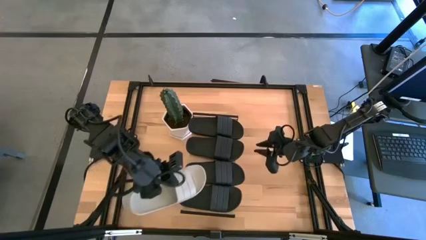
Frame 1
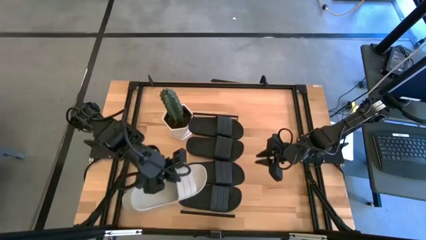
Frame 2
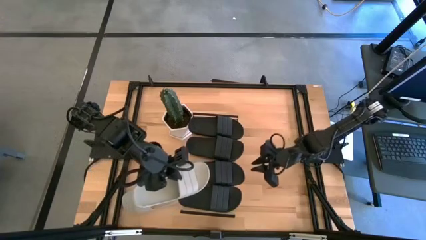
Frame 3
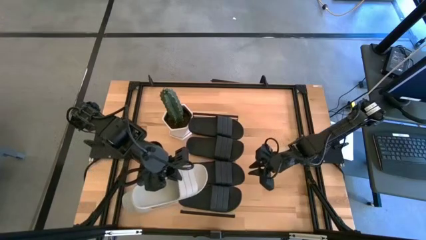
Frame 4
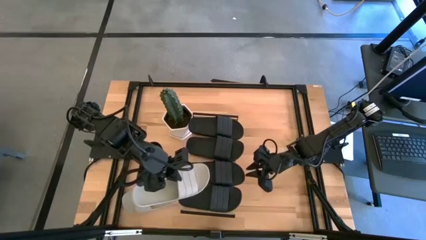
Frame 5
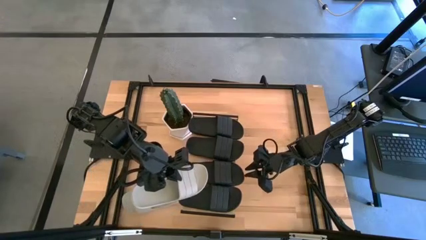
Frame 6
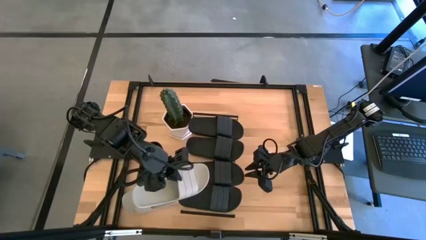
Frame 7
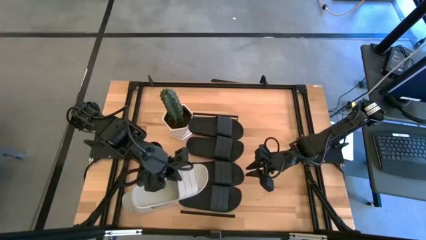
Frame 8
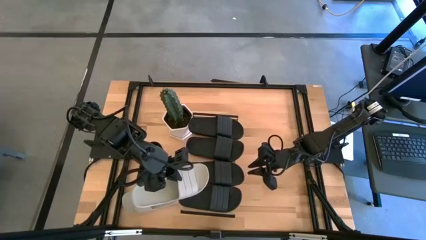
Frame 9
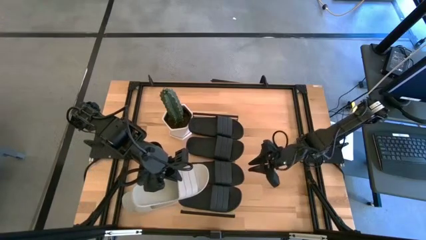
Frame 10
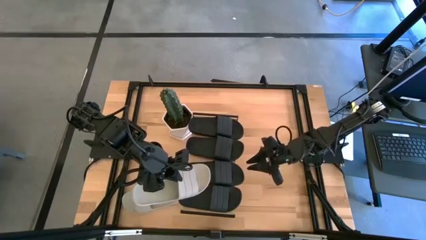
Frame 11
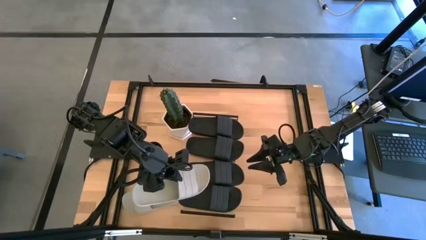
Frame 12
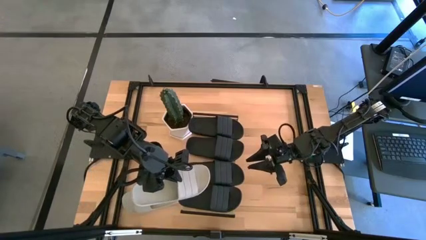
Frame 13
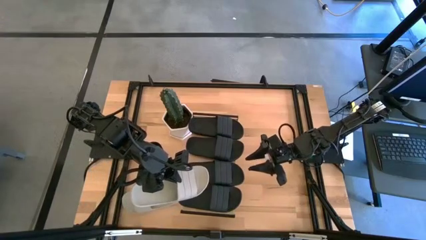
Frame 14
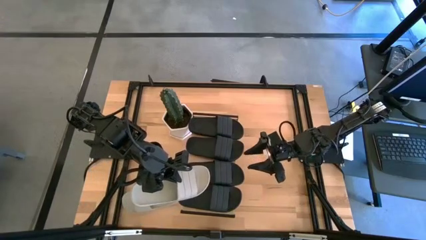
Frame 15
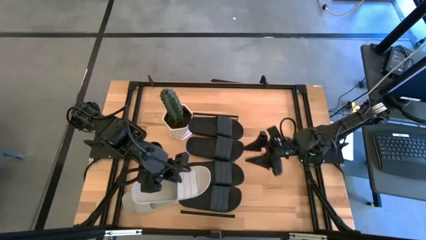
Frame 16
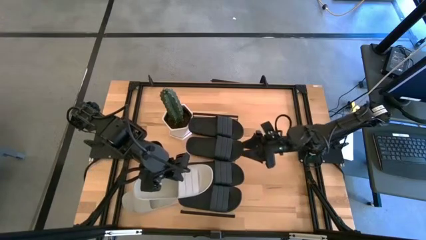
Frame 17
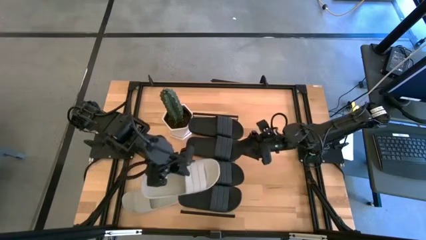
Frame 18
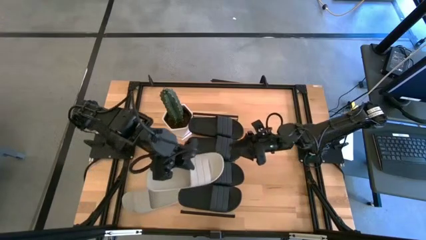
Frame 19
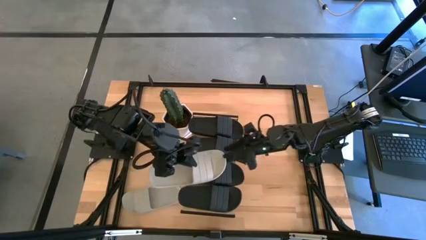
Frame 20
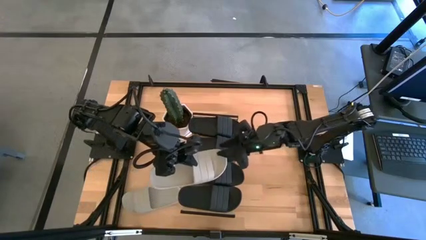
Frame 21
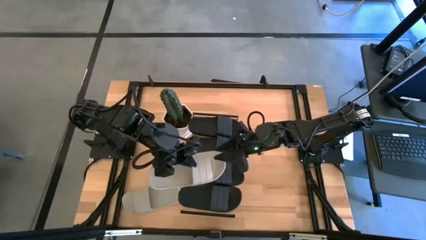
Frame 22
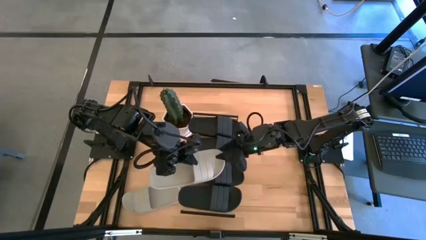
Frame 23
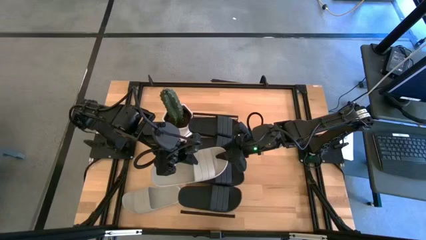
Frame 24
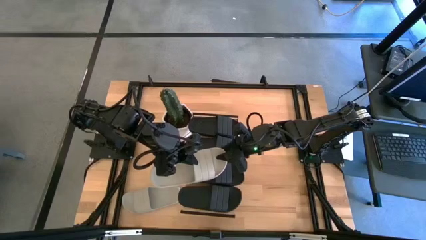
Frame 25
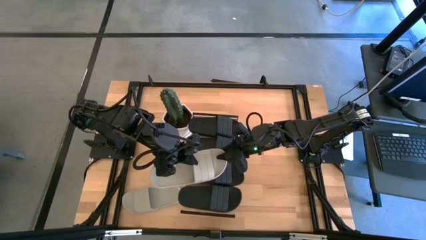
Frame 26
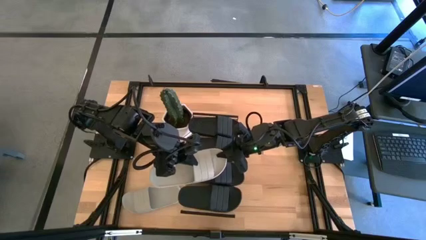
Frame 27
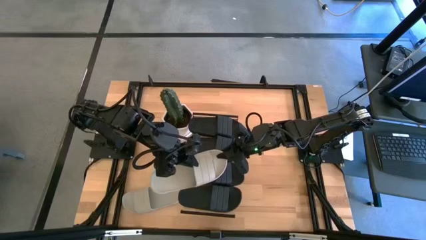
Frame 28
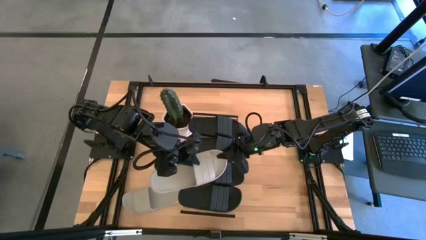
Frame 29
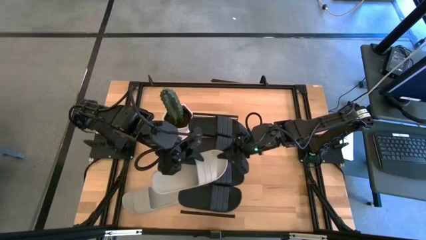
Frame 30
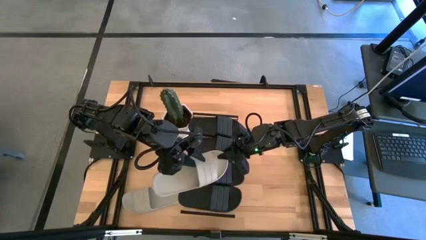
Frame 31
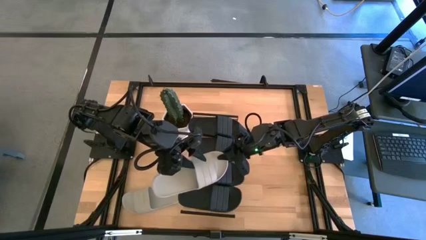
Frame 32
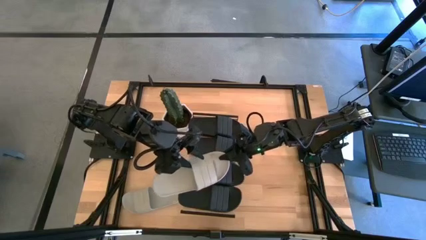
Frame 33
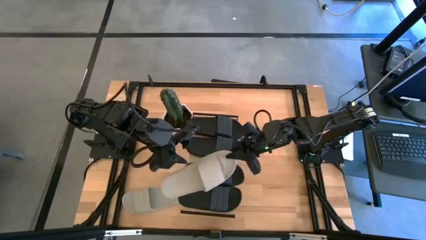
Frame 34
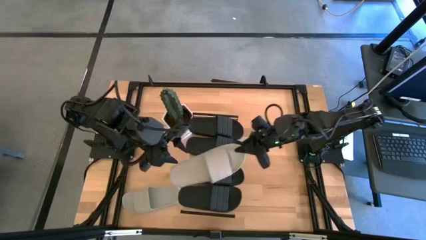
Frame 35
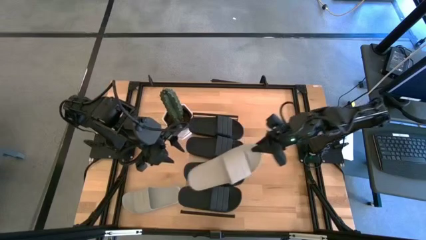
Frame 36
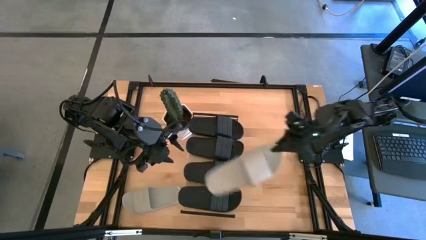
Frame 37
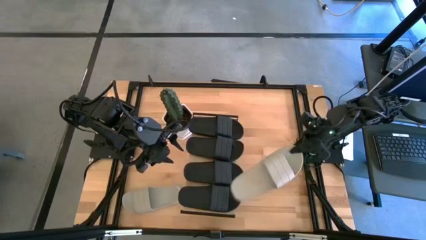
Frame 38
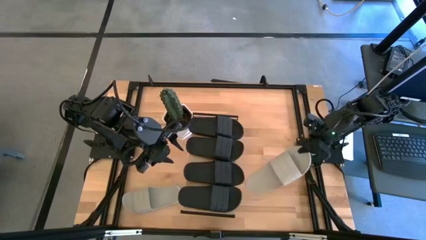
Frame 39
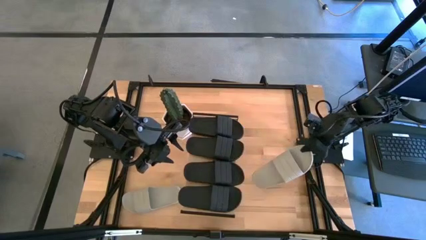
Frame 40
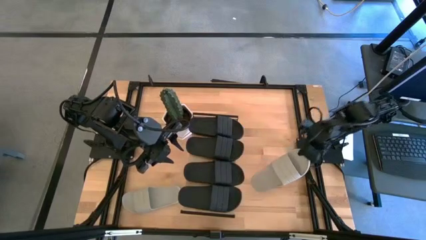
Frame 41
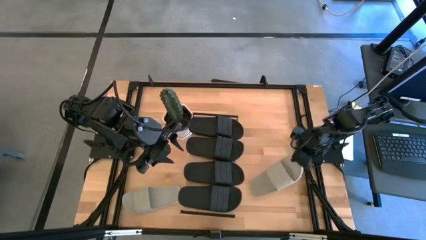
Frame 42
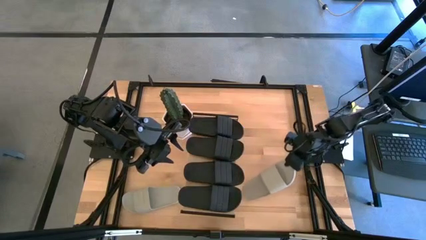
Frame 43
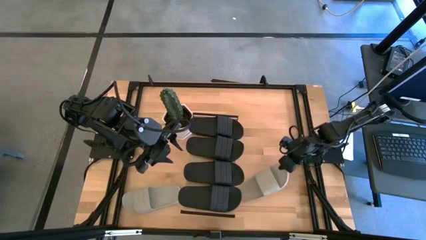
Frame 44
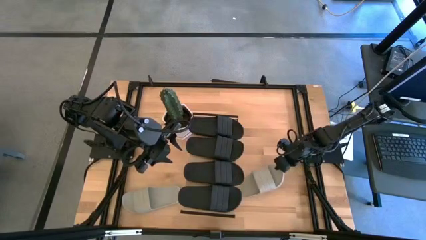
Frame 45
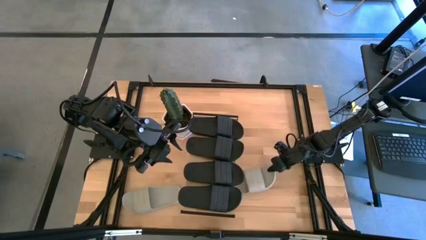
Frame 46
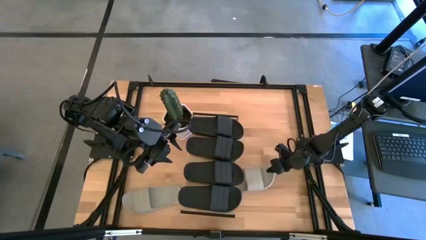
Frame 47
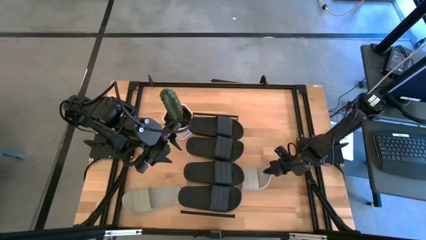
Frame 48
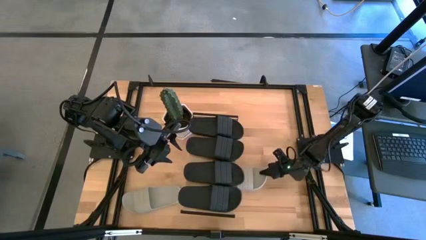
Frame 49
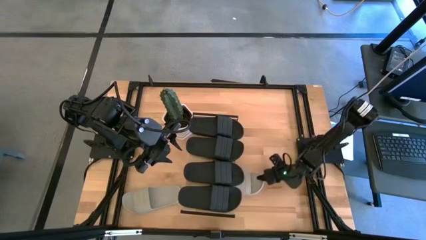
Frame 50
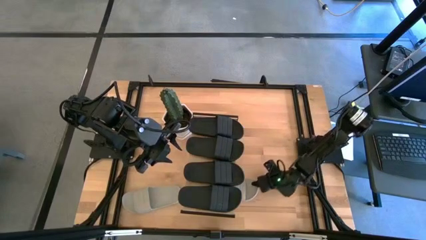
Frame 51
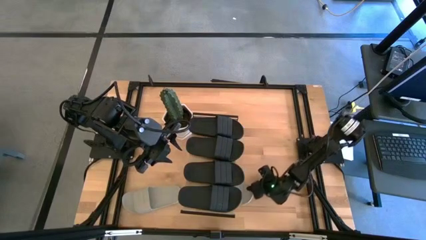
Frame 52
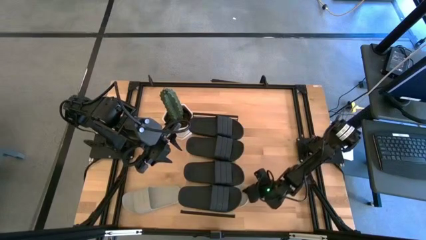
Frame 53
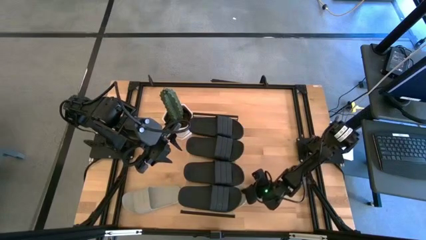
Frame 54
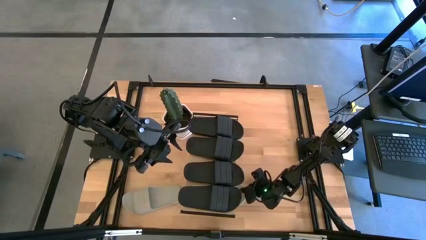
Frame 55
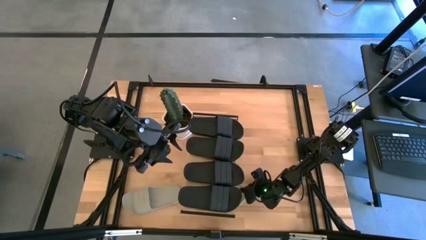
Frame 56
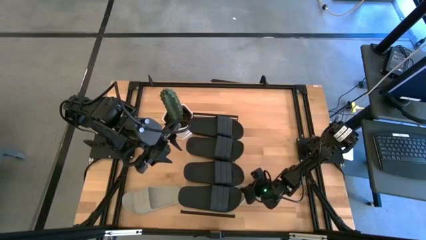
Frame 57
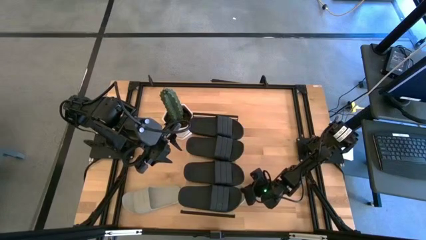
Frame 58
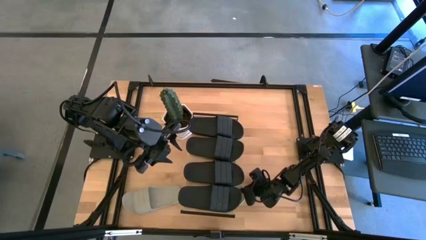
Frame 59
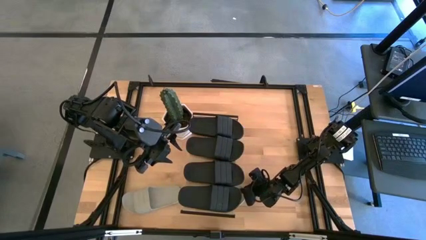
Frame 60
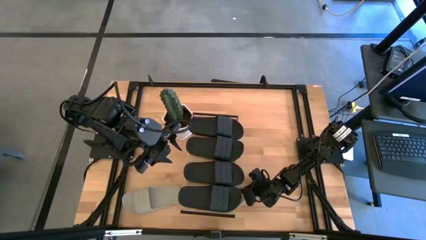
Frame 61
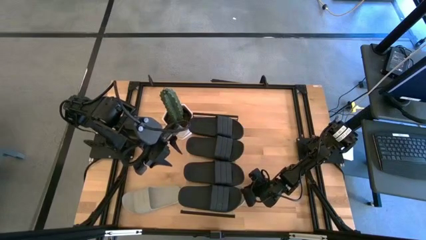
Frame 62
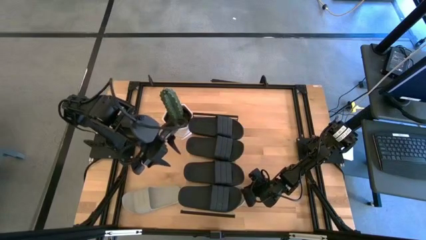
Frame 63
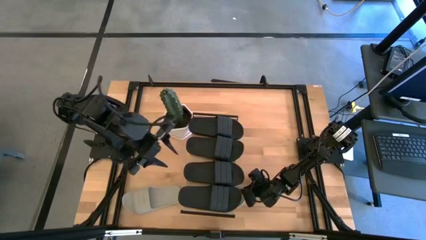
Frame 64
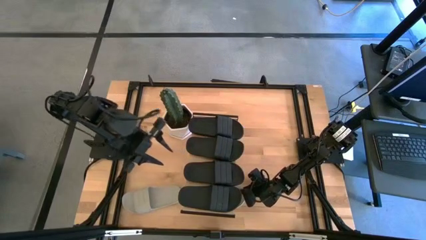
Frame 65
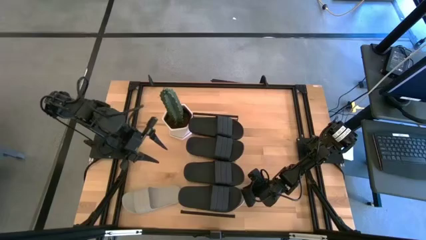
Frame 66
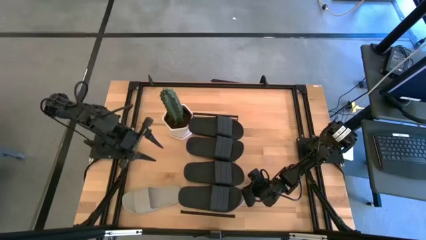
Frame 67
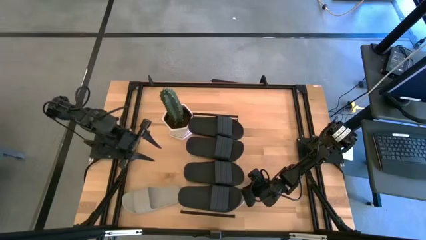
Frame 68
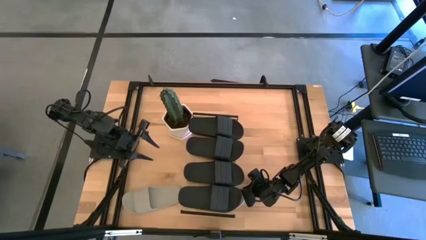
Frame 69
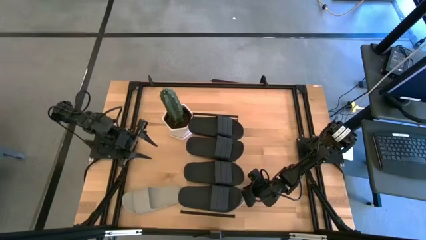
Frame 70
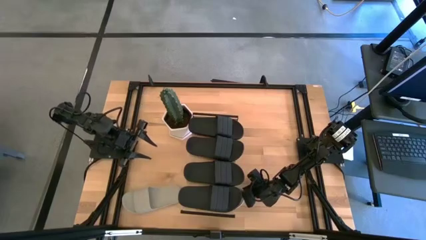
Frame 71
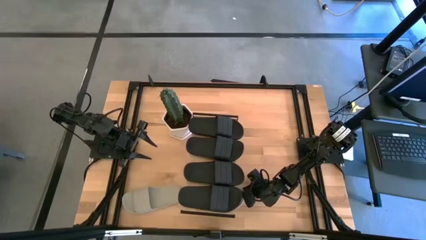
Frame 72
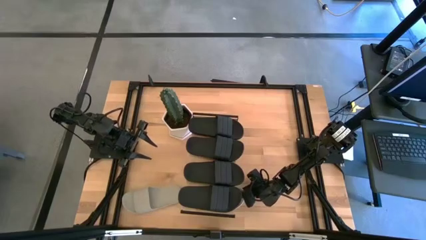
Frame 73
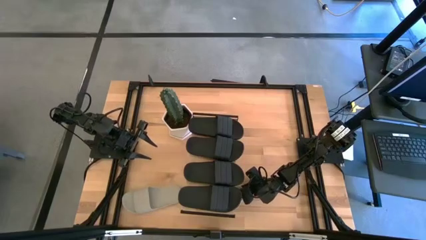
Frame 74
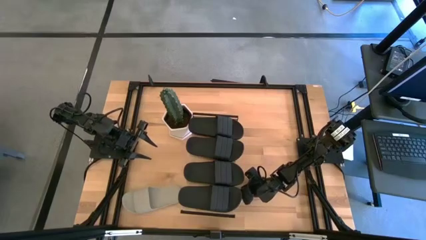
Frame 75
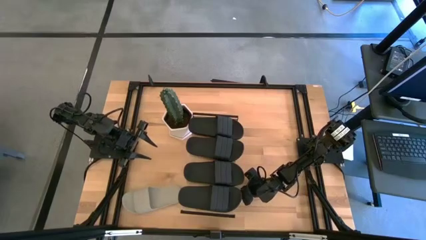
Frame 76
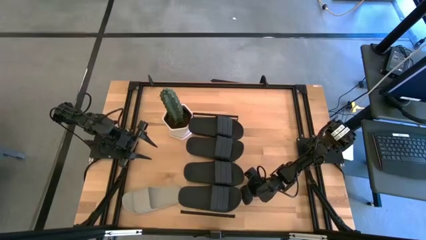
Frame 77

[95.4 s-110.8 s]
Task: Pick and place slides into the shelf
Put the gray slide under the shelf
